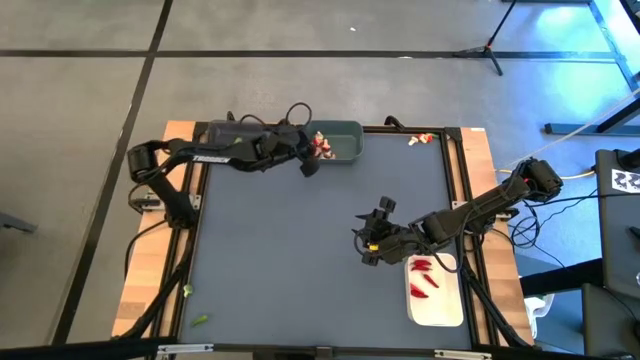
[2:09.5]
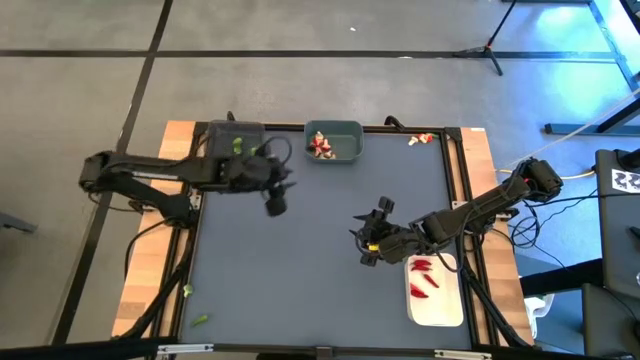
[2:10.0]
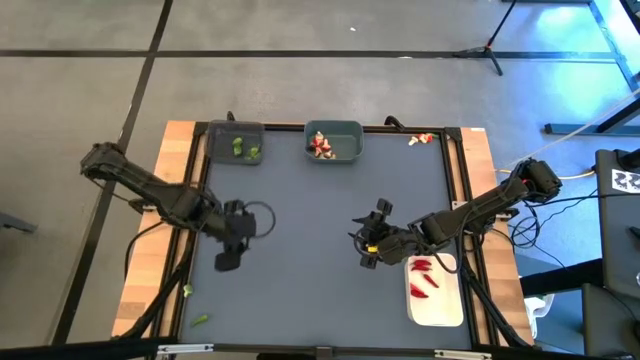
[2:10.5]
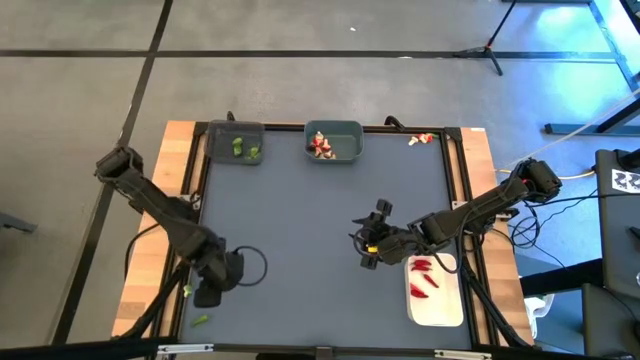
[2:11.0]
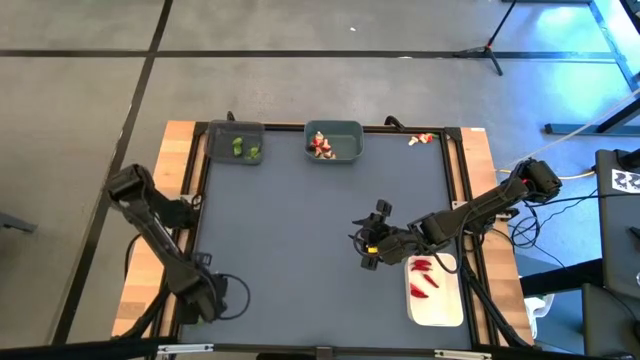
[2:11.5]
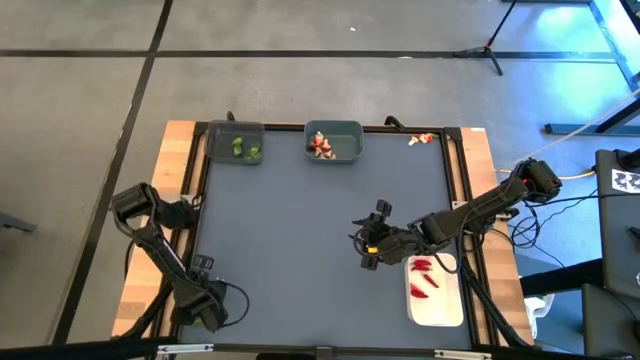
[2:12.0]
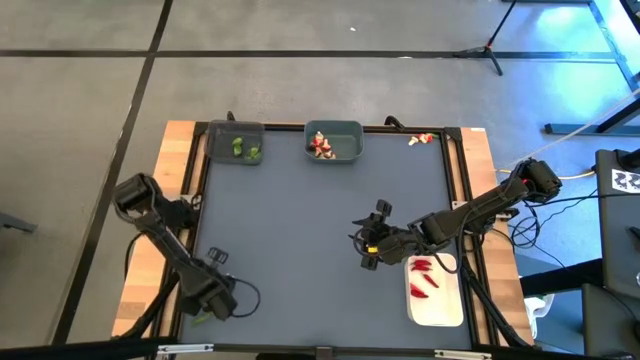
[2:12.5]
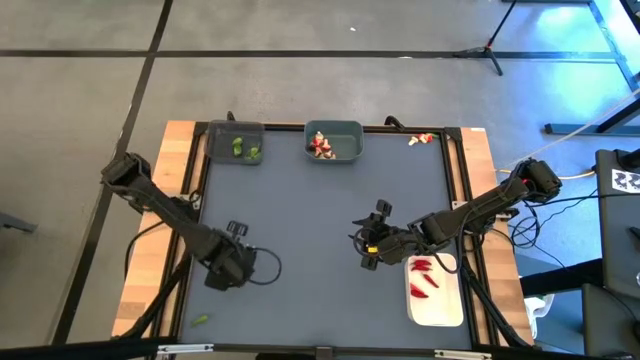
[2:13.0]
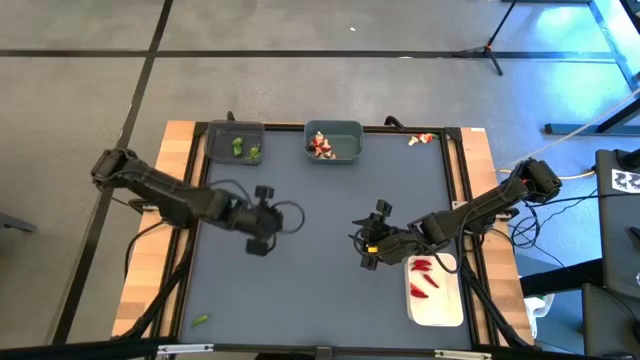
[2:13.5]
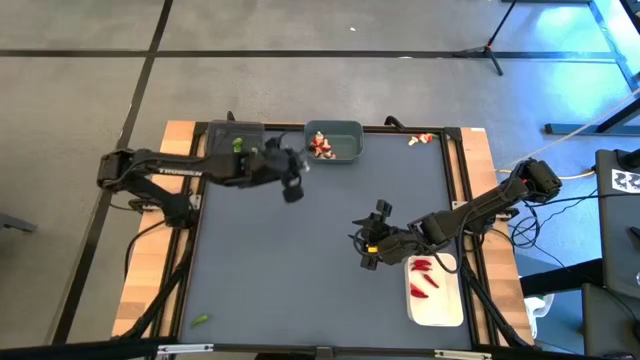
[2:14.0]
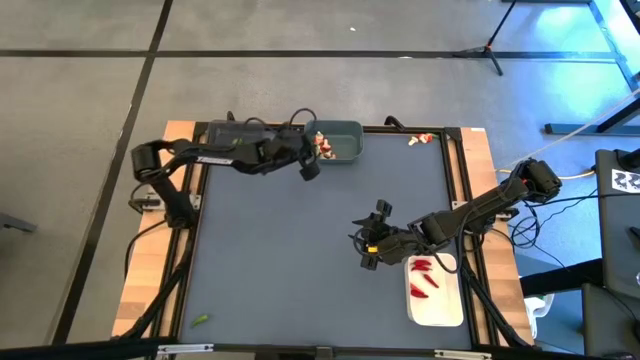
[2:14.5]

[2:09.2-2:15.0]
Task: Sort produce into baskets
Put the green mushroom into the blue bin

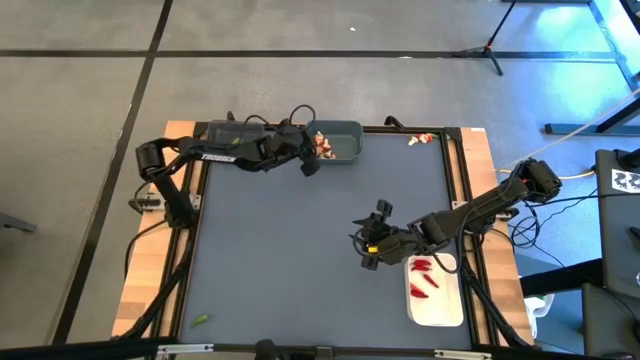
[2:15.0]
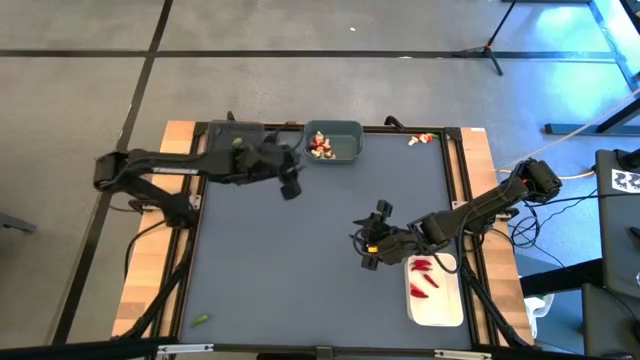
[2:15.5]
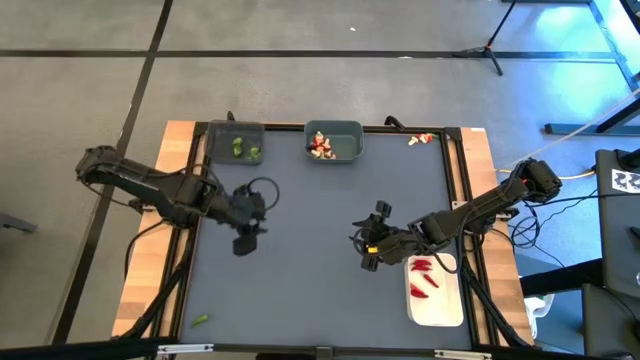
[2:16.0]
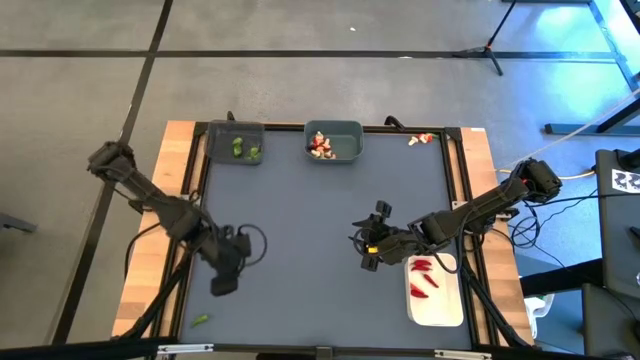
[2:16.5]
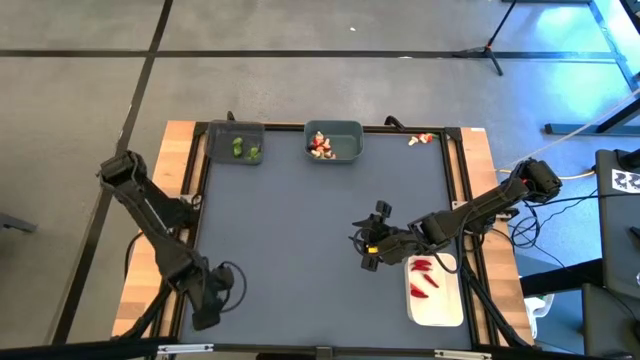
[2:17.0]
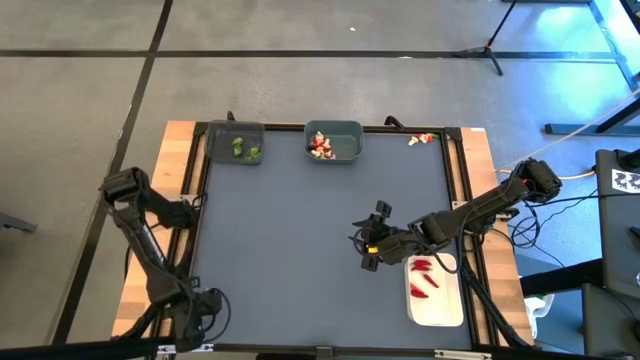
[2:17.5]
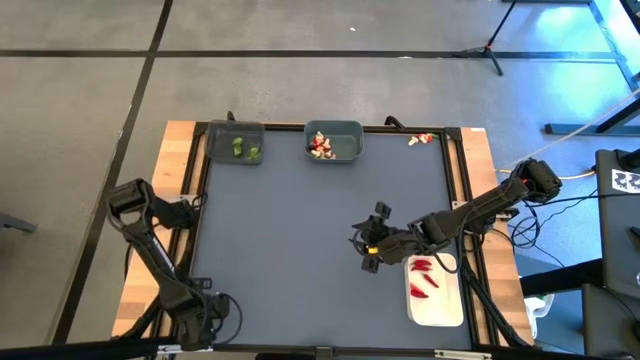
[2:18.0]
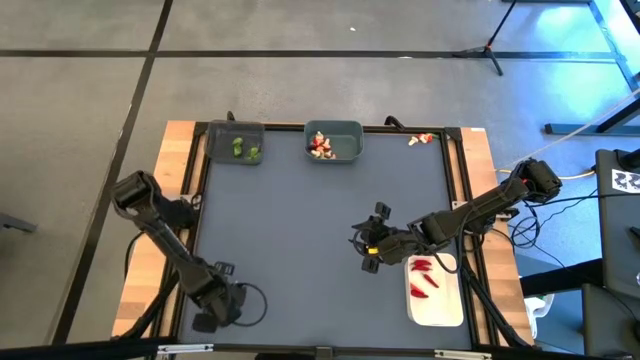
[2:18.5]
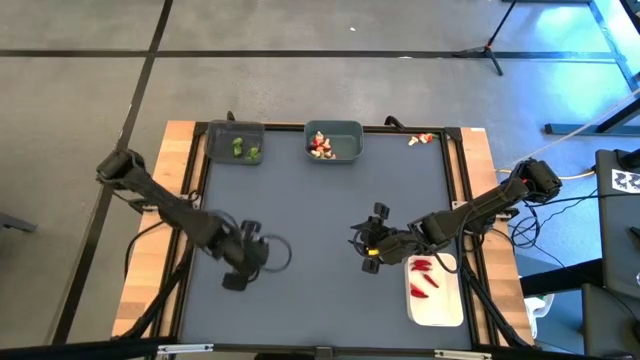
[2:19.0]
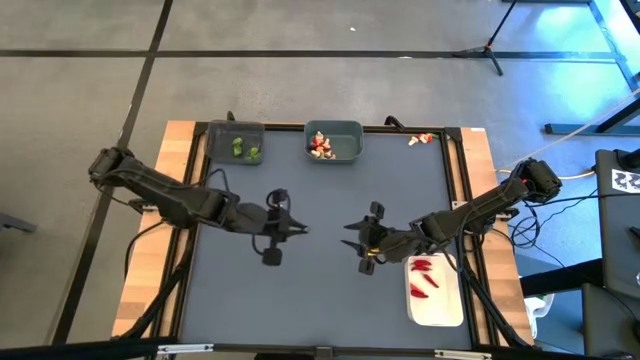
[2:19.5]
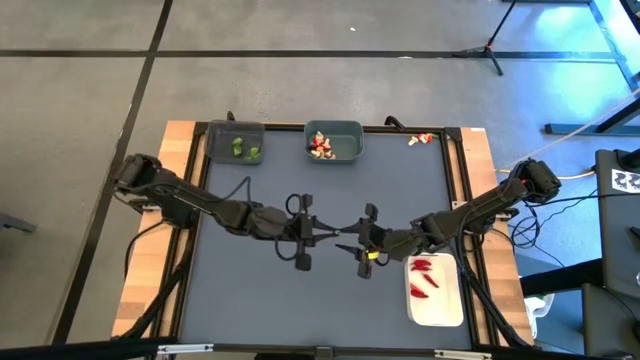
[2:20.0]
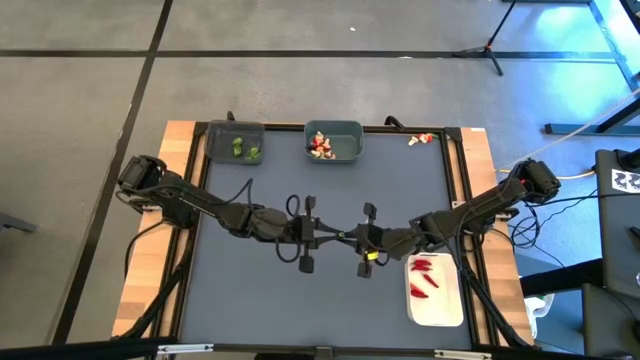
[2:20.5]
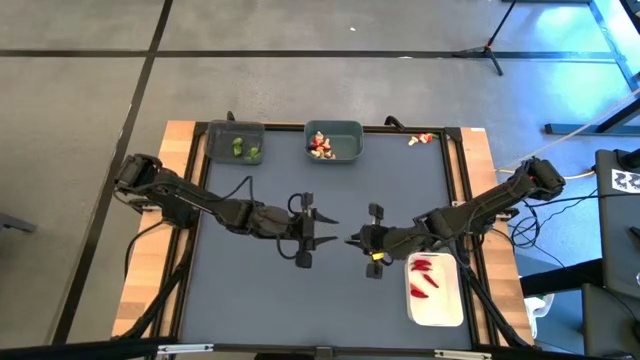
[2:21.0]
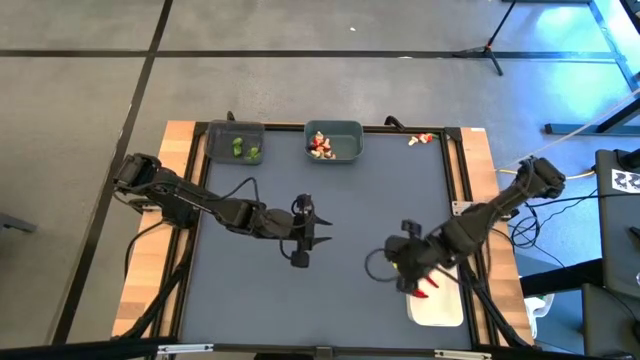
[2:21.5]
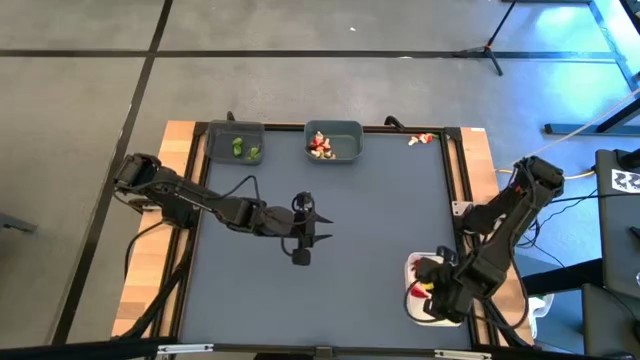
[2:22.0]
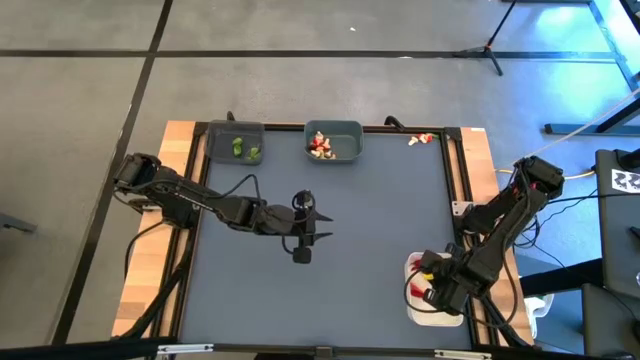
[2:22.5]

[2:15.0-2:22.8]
Put the green chili pepper into the white bin

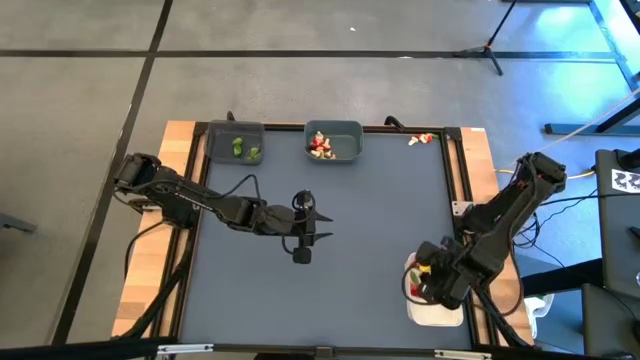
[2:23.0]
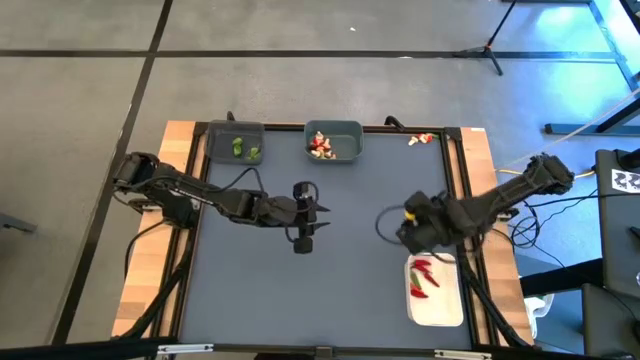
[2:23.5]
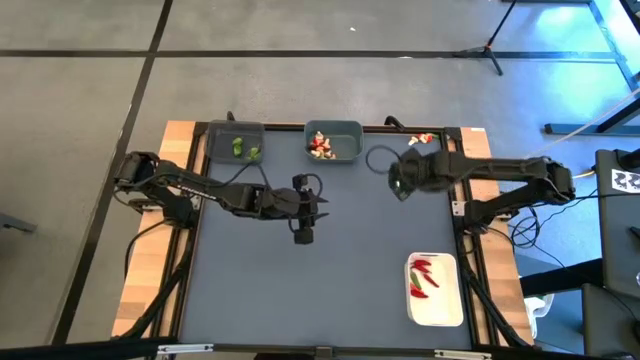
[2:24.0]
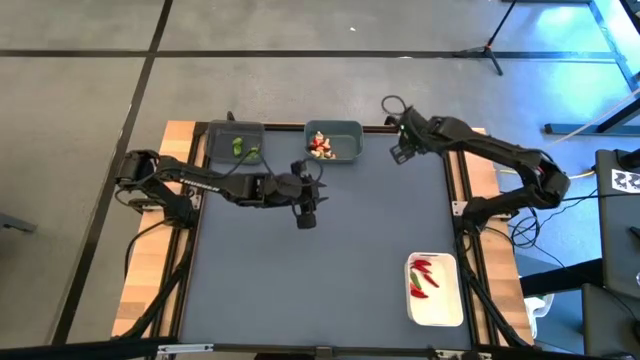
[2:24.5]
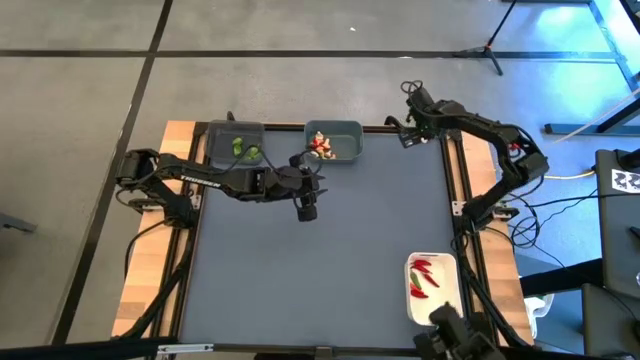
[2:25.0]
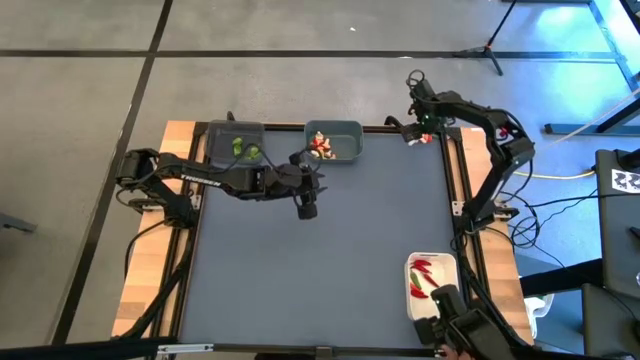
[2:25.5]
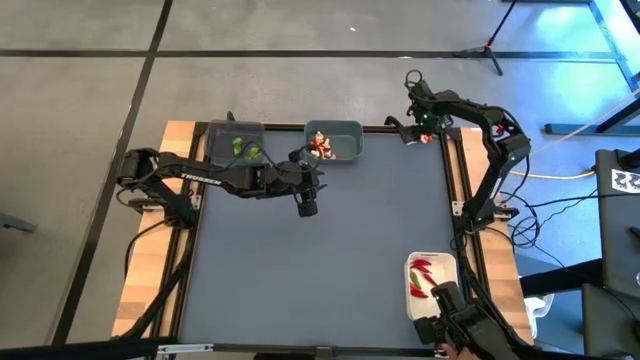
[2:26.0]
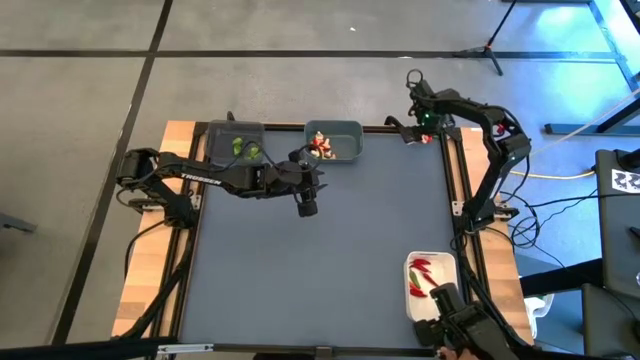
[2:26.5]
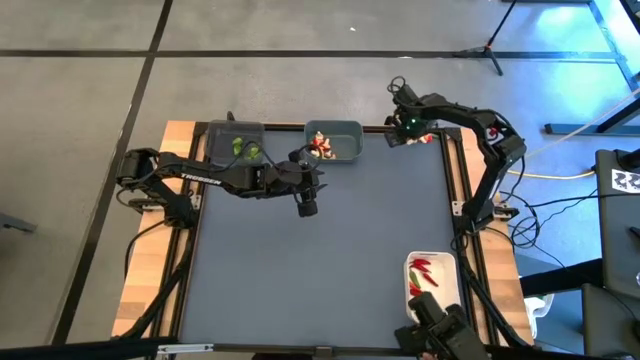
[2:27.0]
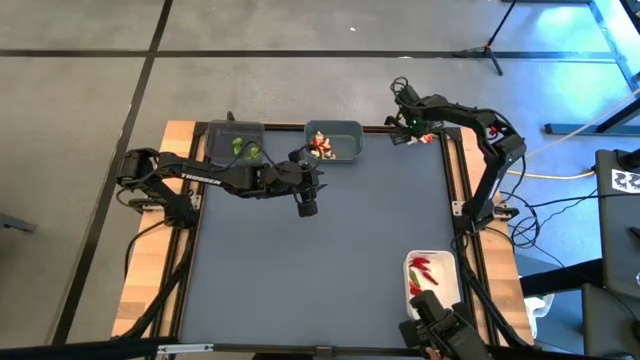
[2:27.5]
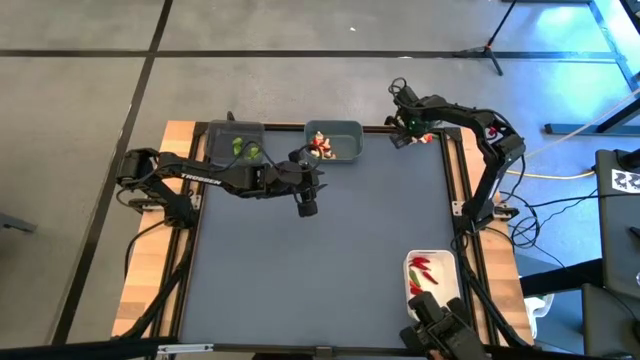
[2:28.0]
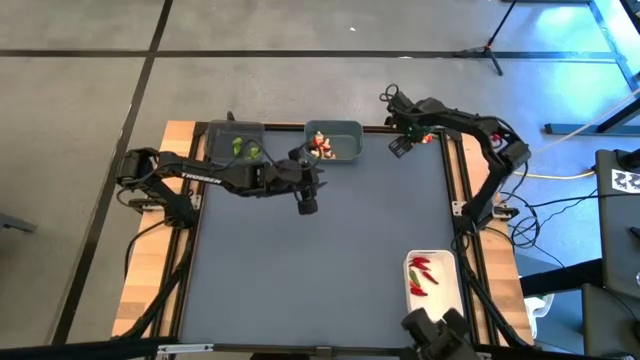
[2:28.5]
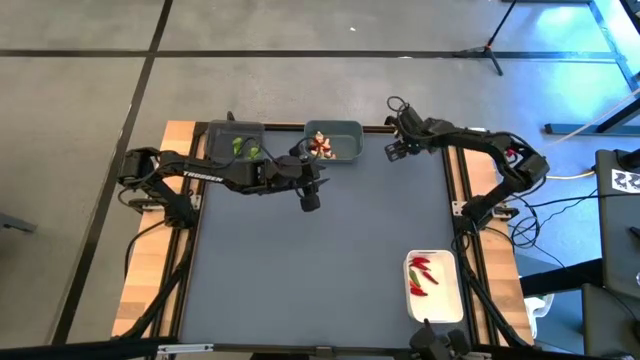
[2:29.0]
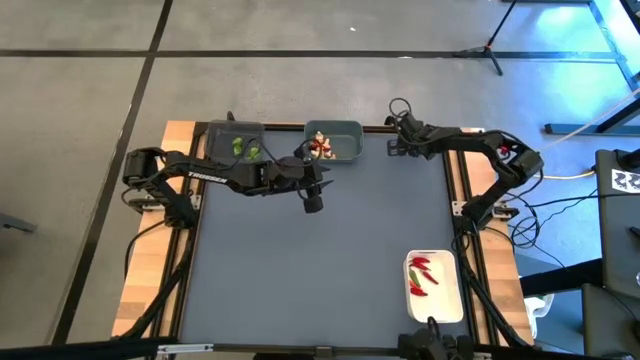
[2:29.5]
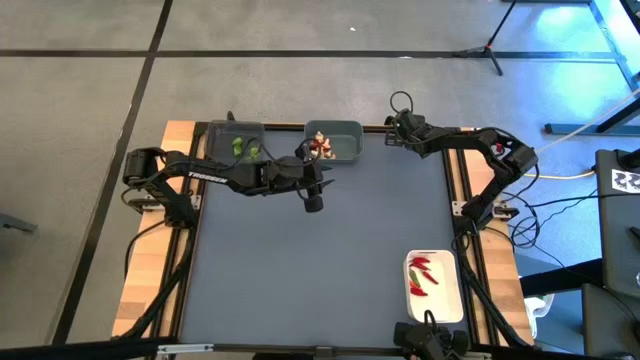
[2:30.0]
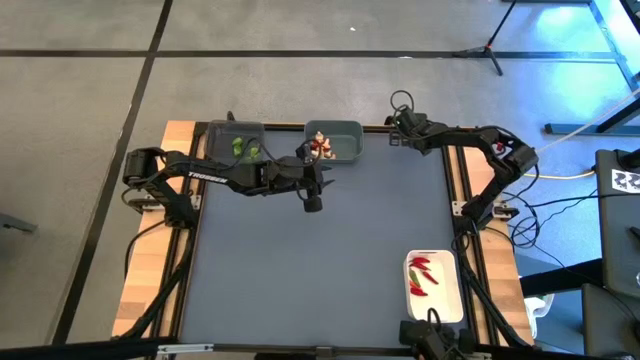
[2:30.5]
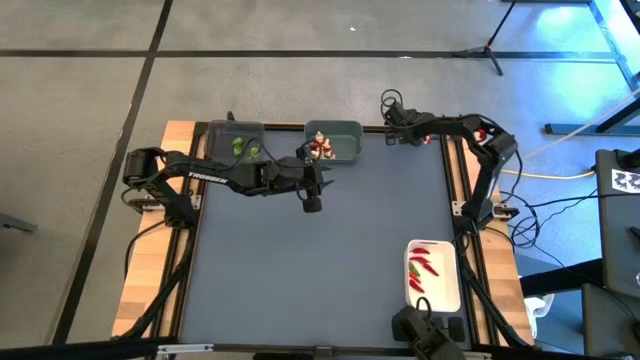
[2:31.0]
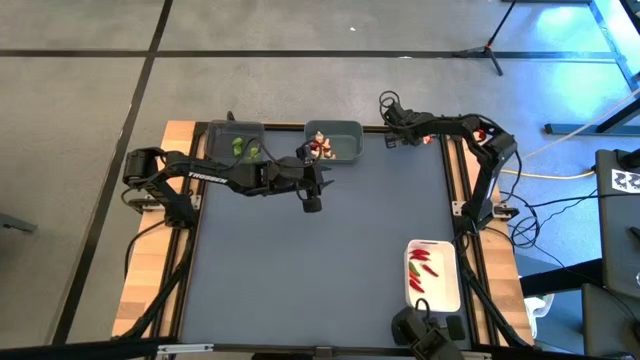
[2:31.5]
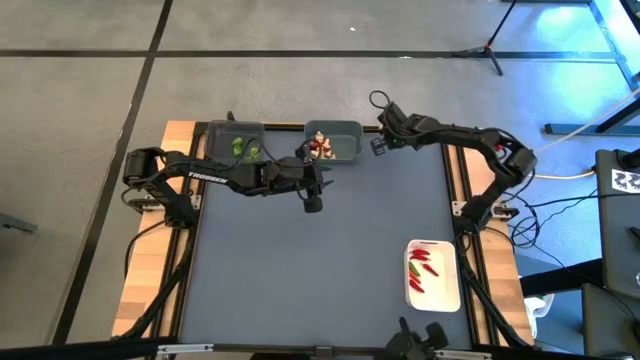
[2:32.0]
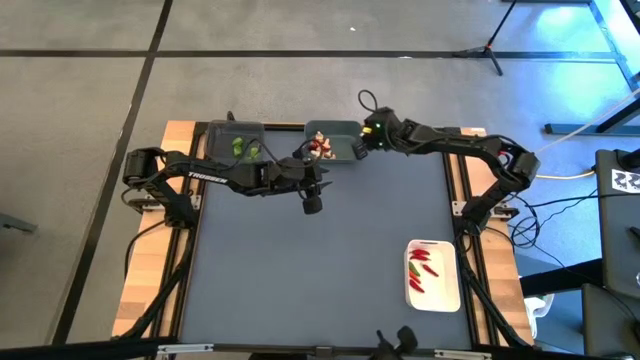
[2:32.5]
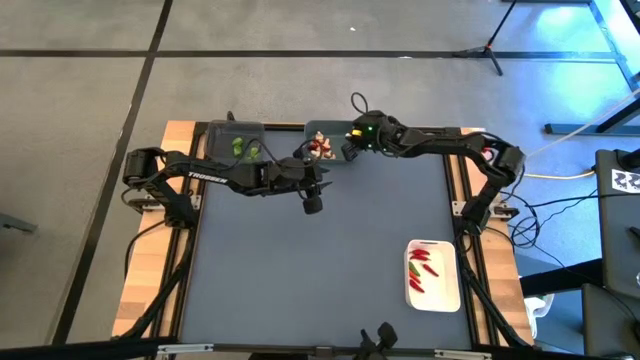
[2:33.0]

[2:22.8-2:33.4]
Put the brown mushroom into the blue bin
